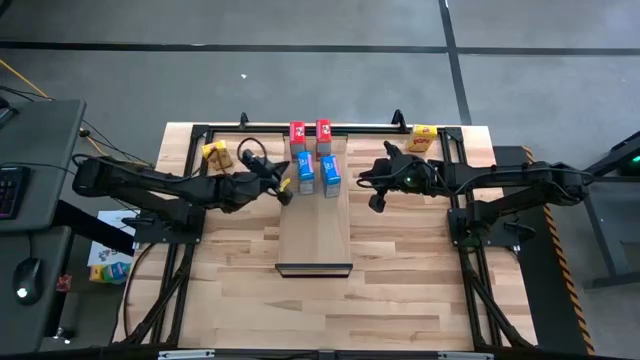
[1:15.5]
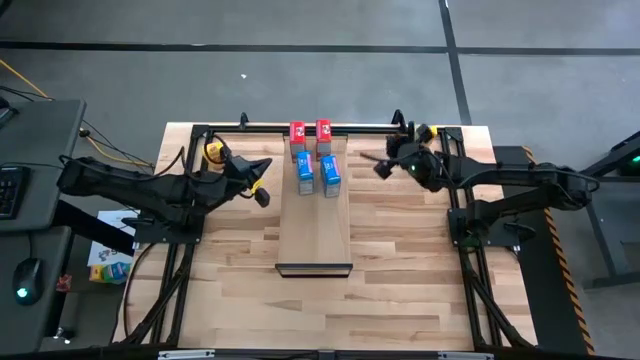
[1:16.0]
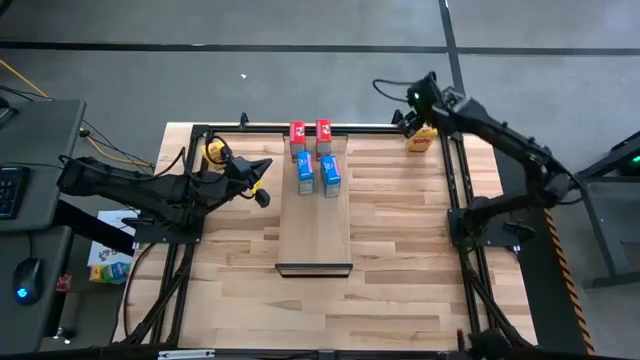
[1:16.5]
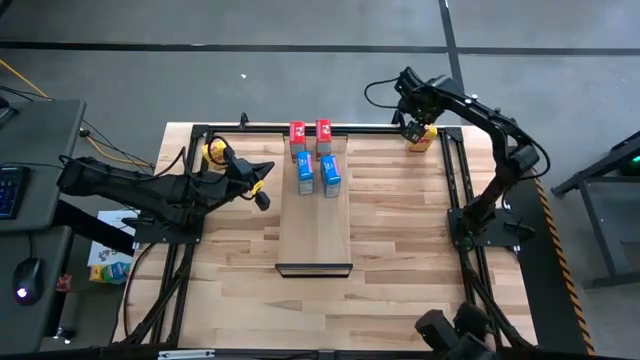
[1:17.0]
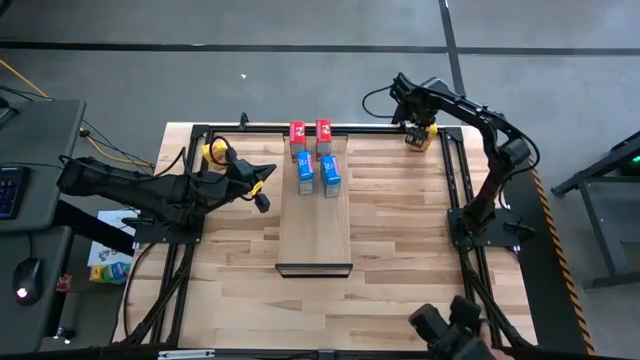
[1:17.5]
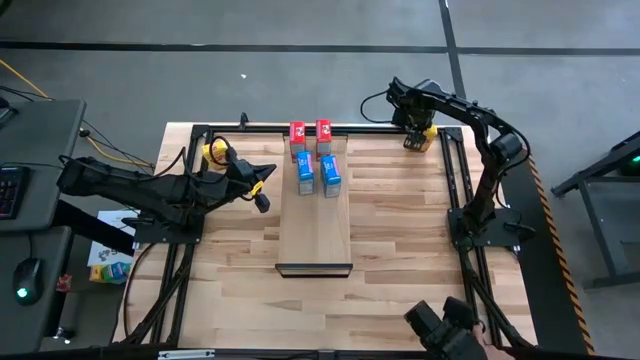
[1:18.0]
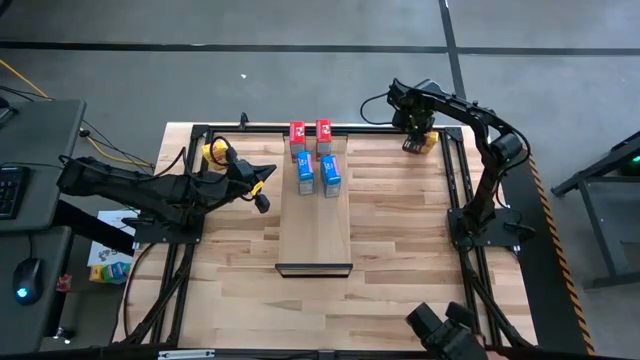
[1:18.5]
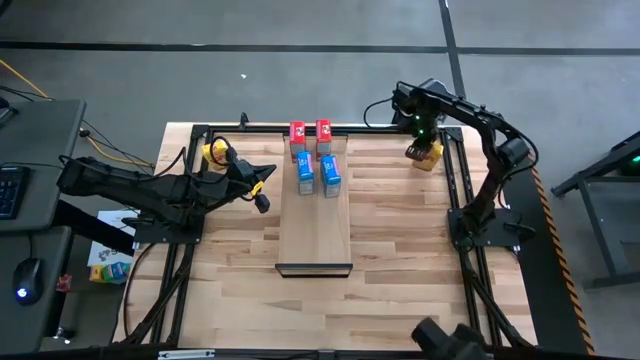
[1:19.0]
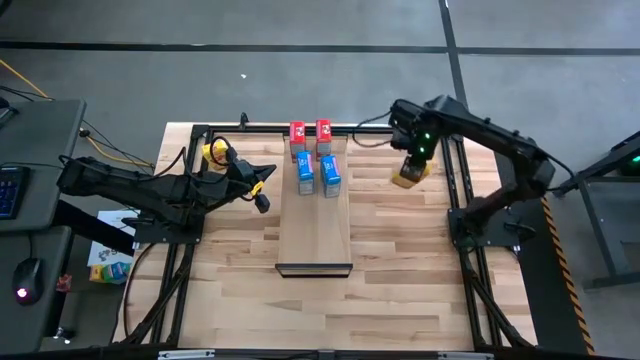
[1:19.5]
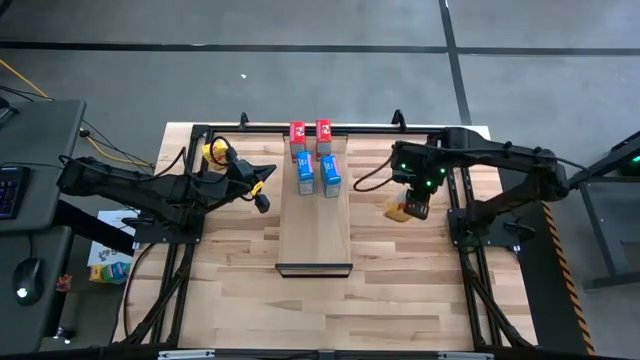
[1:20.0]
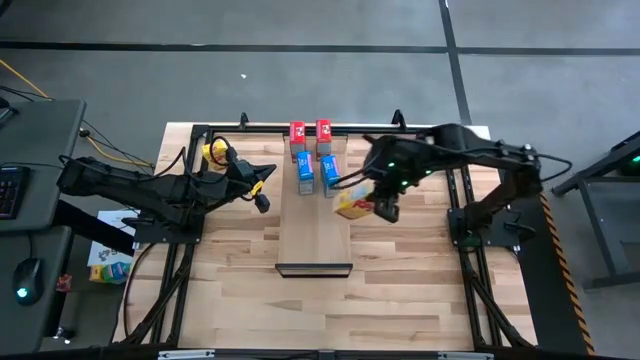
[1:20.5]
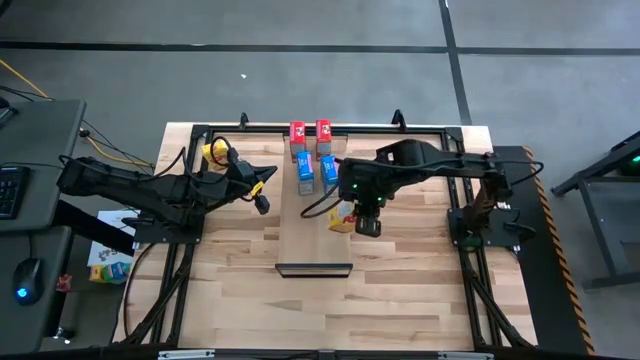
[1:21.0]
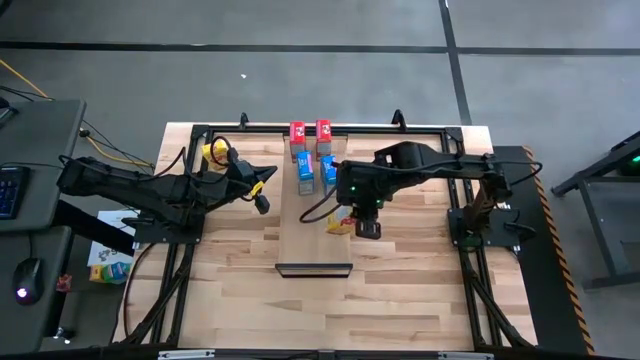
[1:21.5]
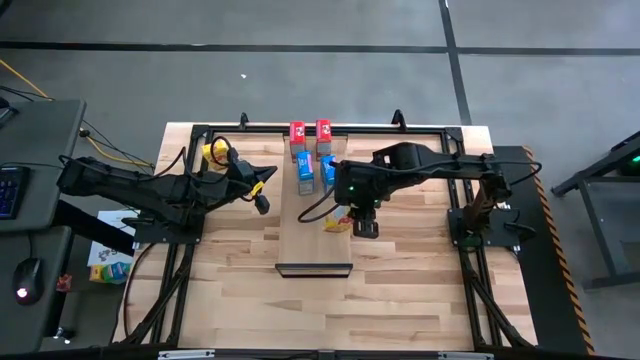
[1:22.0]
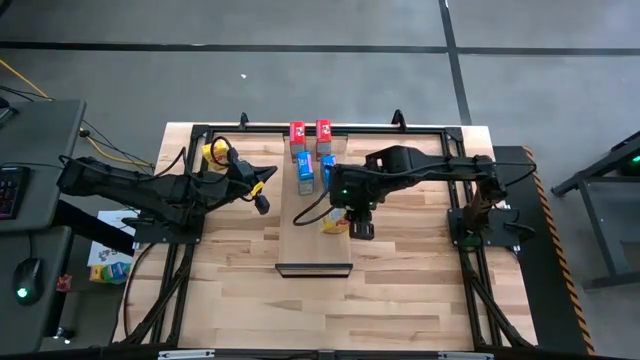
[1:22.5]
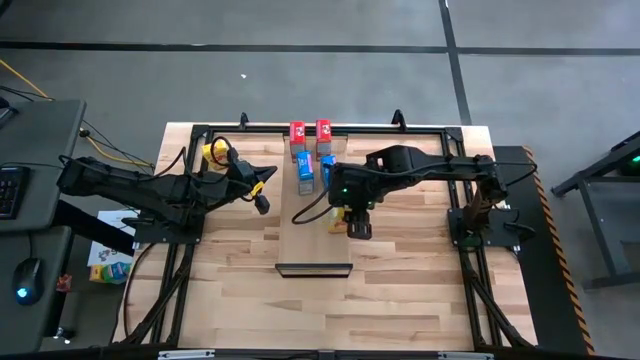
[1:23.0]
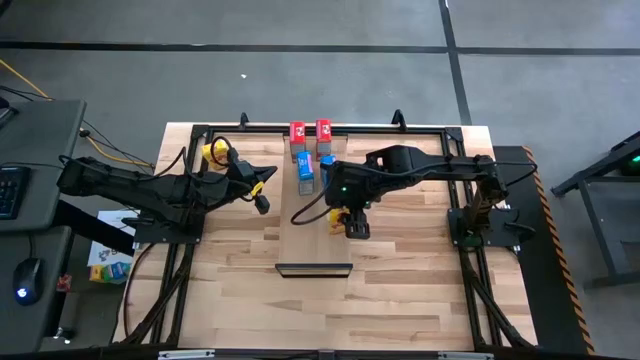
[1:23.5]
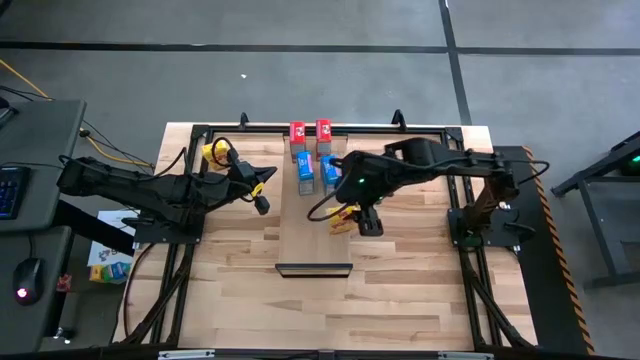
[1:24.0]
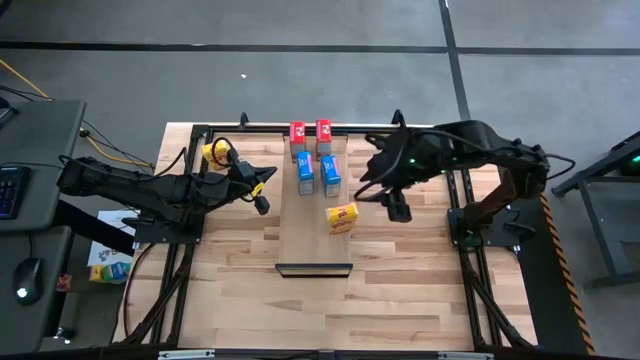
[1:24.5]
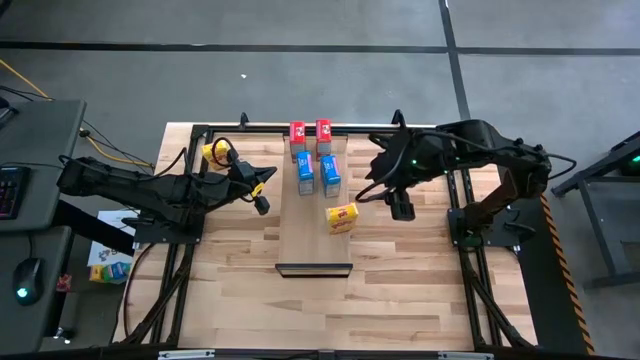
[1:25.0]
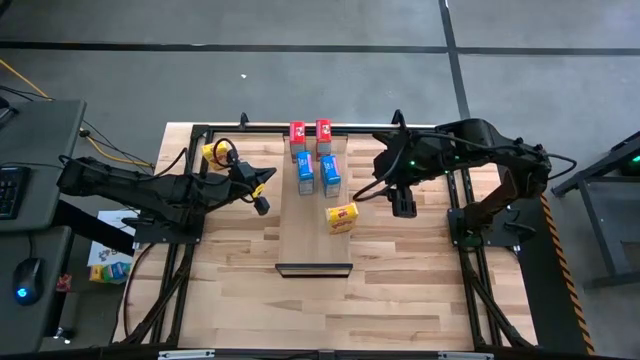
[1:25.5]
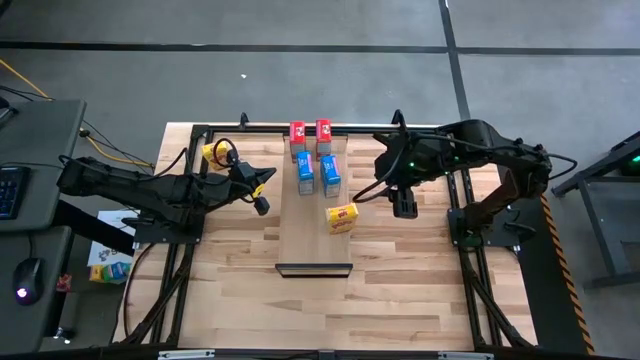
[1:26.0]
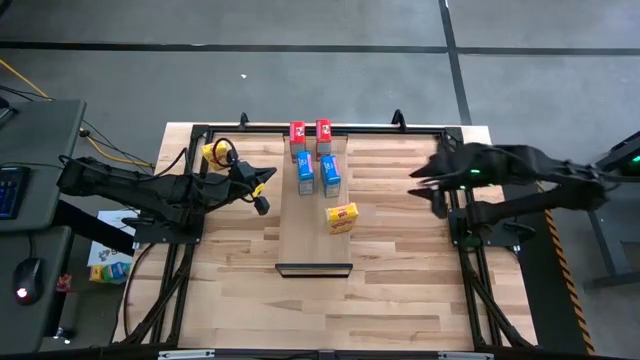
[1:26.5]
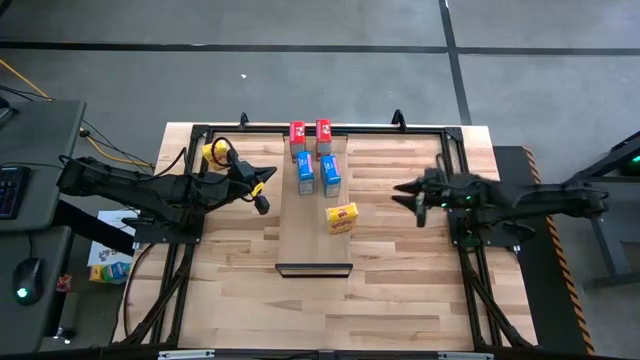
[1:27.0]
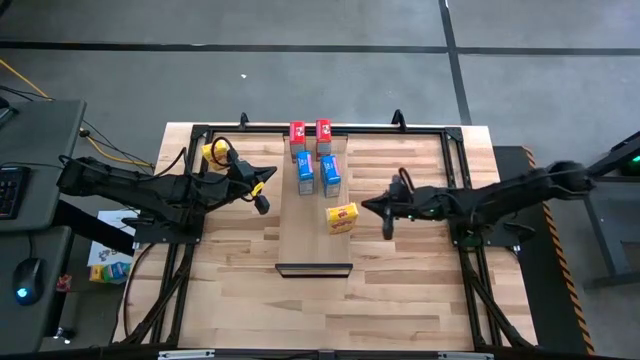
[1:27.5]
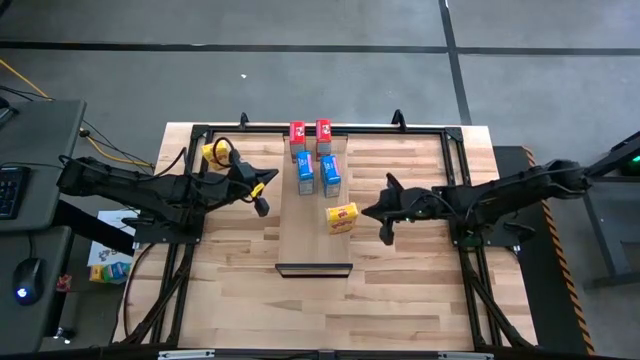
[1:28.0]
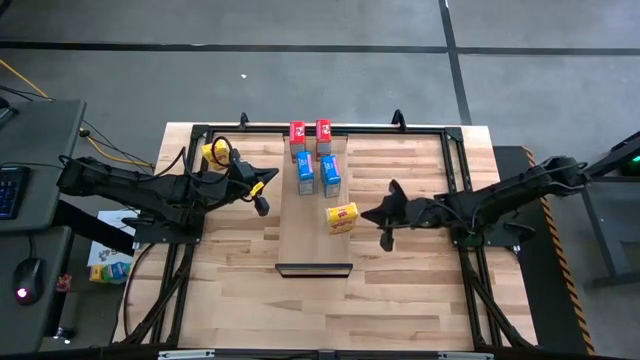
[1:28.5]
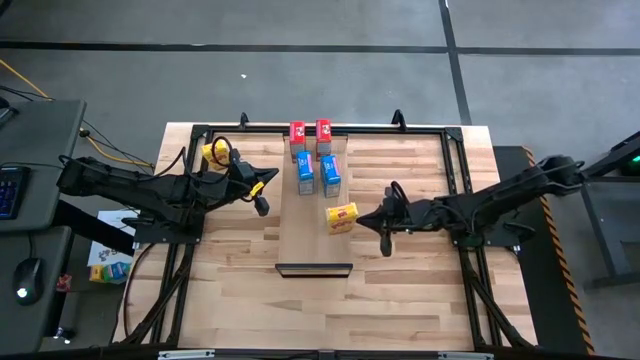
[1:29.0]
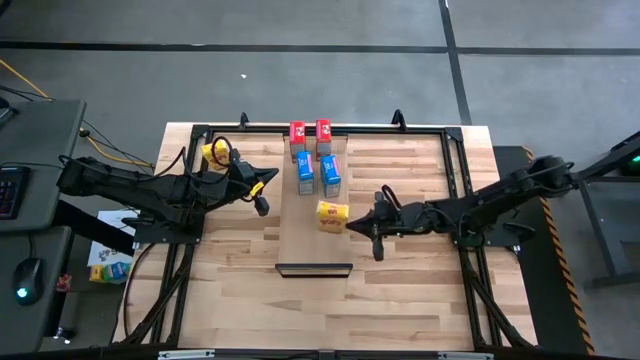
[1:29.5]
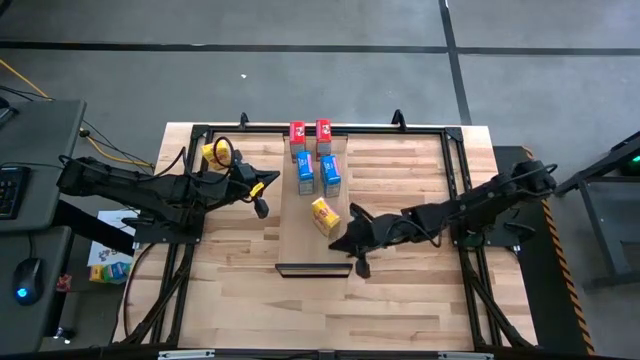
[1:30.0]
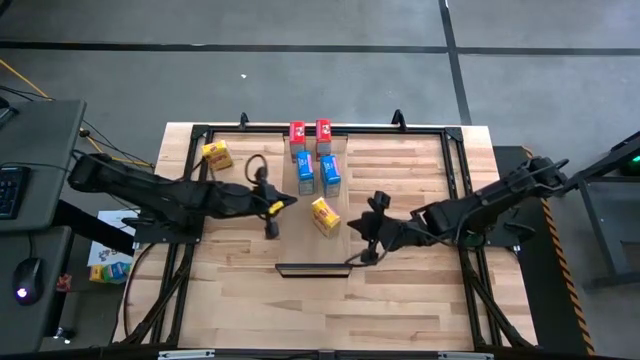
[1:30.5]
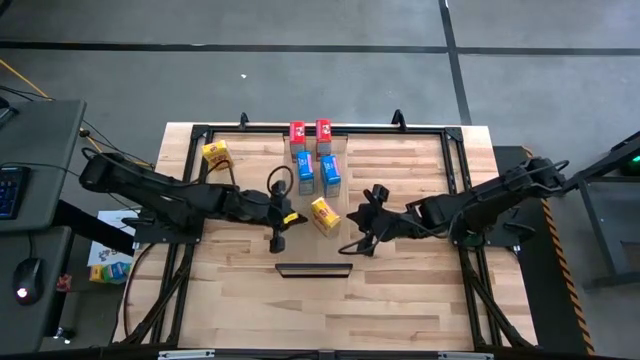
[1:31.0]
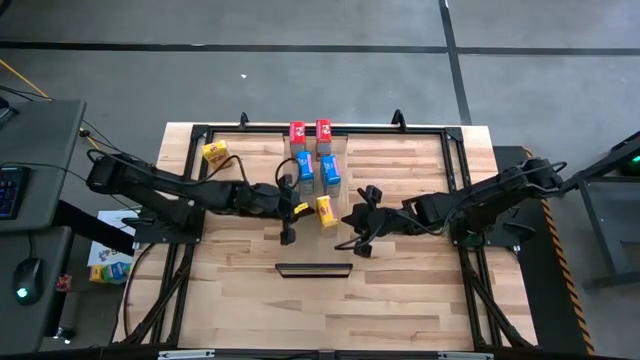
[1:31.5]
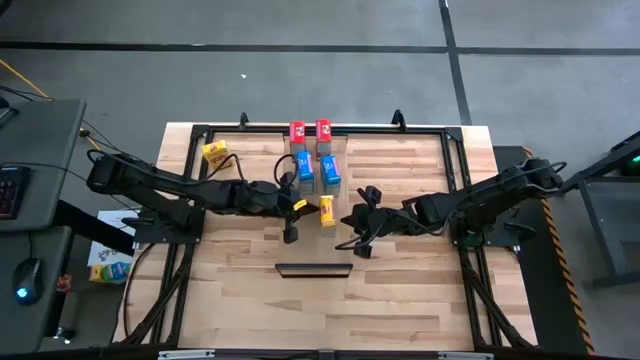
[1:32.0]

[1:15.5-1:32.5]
Task: Stack cereal on shelf
Put the right yellow cereal box on the shelf

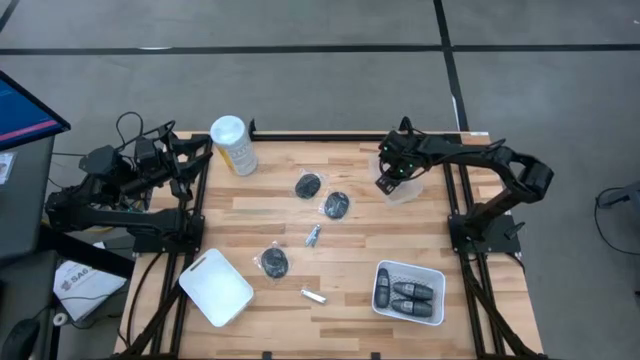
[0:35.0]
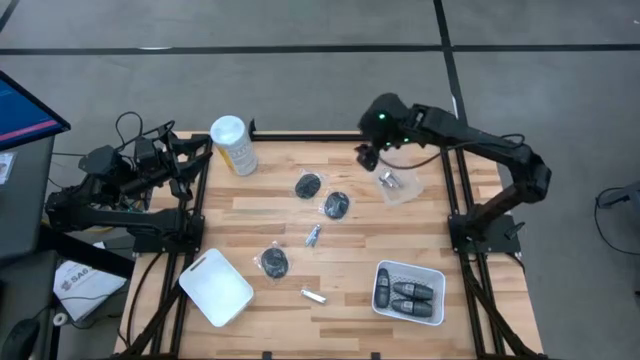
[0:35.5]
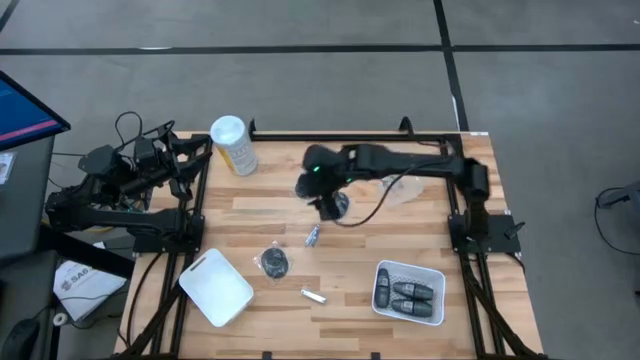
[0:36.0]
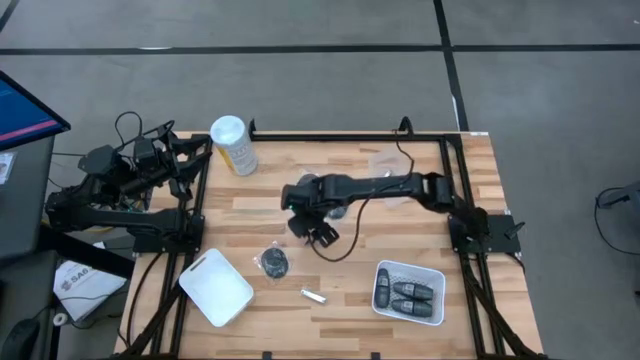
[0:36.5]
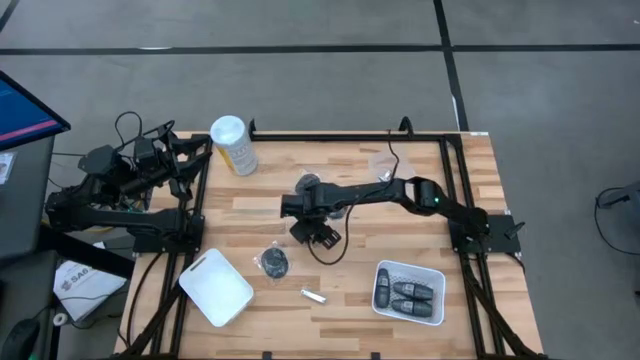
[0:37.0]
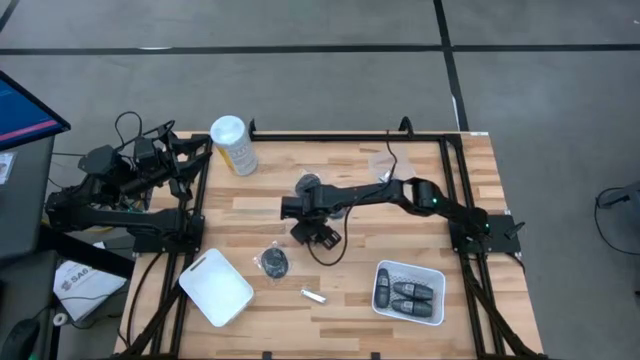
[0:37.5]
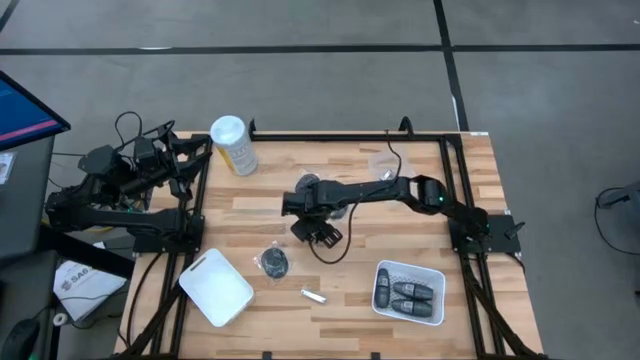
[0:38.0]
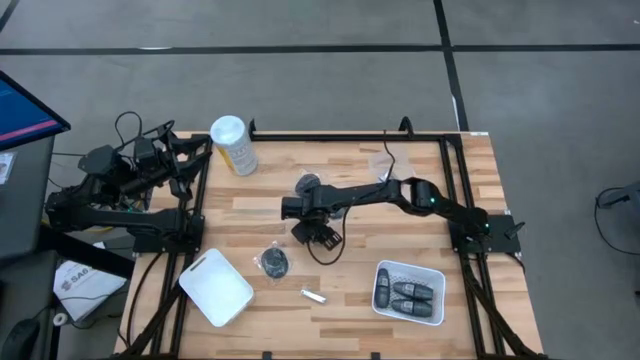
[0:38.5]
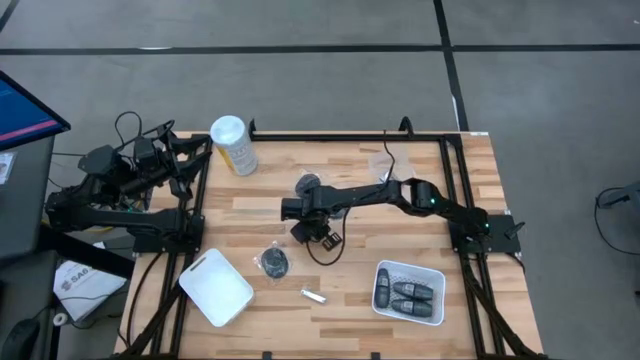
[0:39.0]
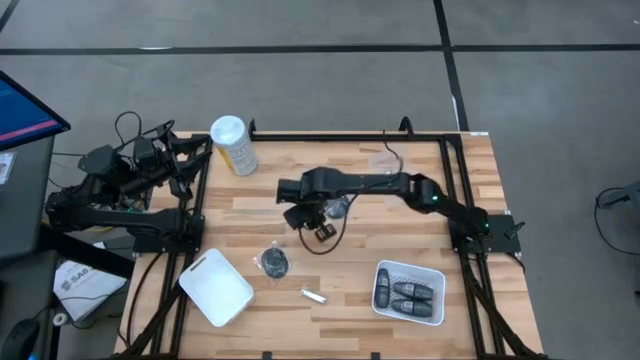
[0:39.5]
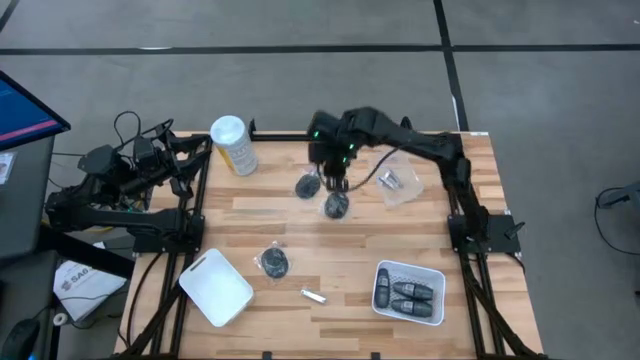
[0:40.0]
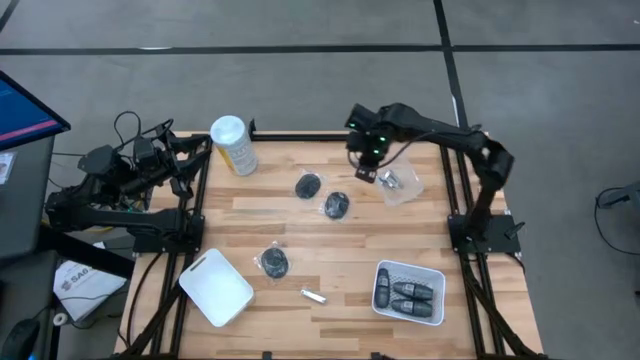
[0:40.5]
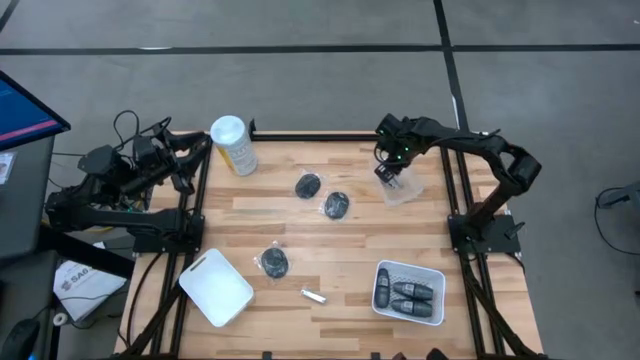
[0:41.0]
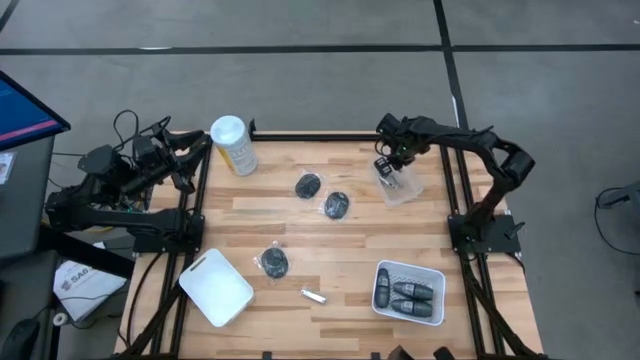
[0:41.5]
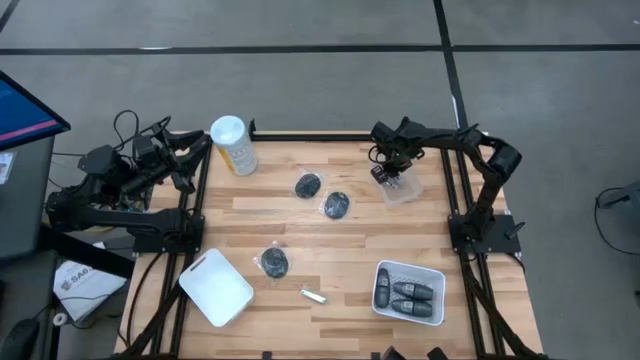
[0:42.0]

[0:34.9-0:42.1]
Task: Pick & Place Travel size toiletries
Put the silver nail cutter into the transparent bin
